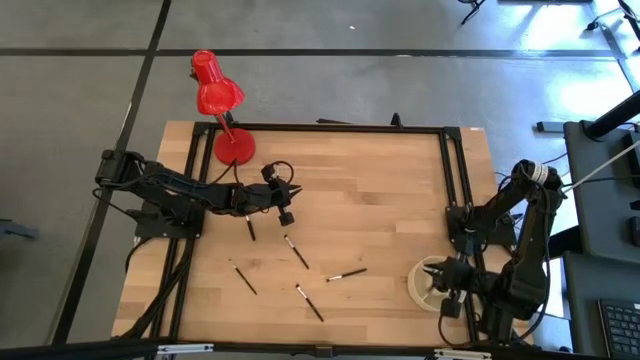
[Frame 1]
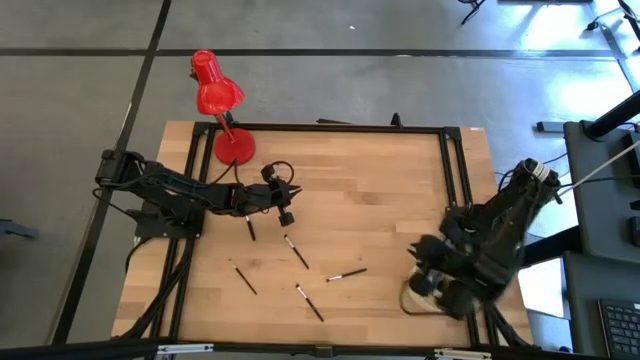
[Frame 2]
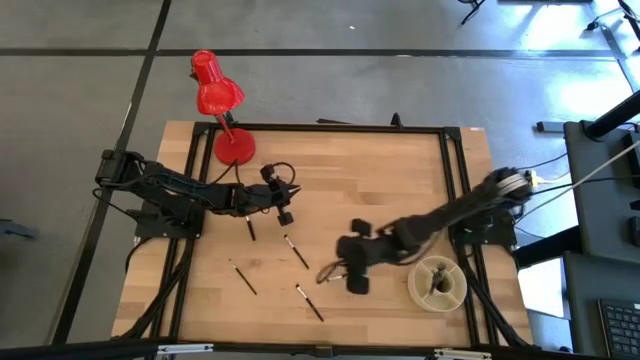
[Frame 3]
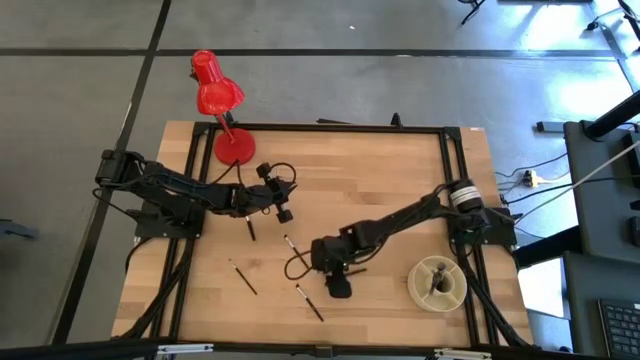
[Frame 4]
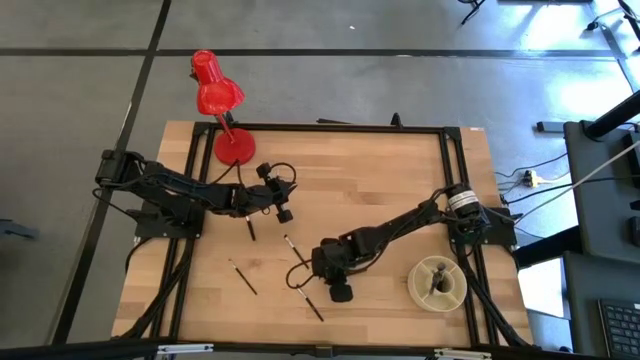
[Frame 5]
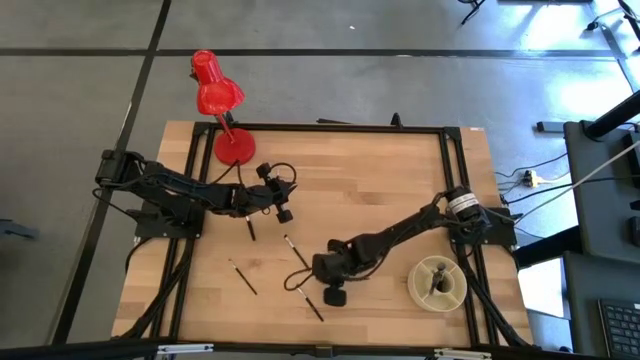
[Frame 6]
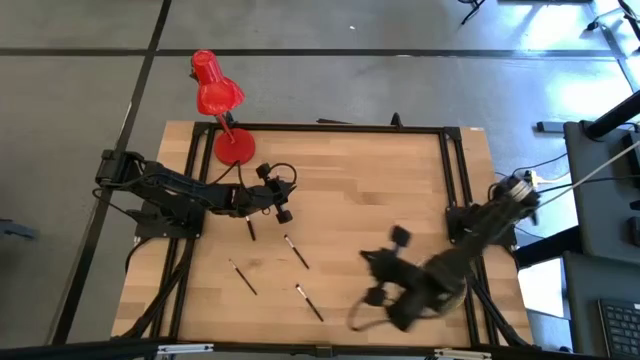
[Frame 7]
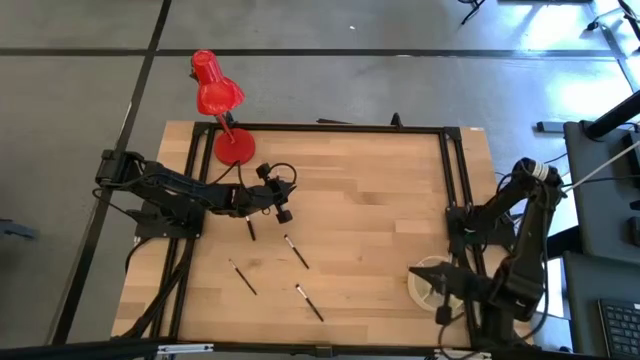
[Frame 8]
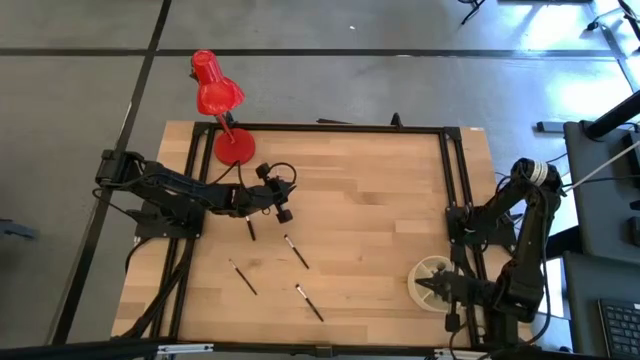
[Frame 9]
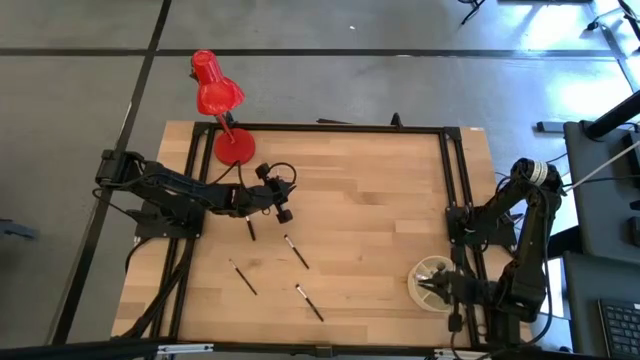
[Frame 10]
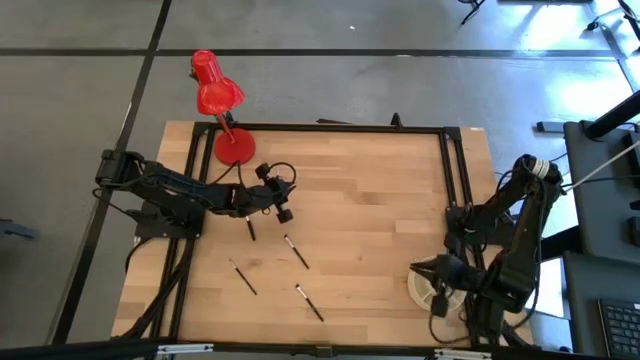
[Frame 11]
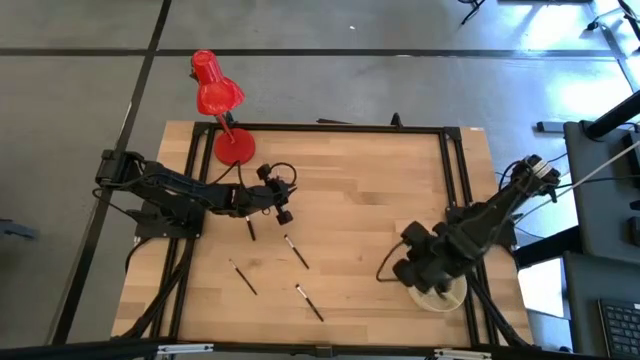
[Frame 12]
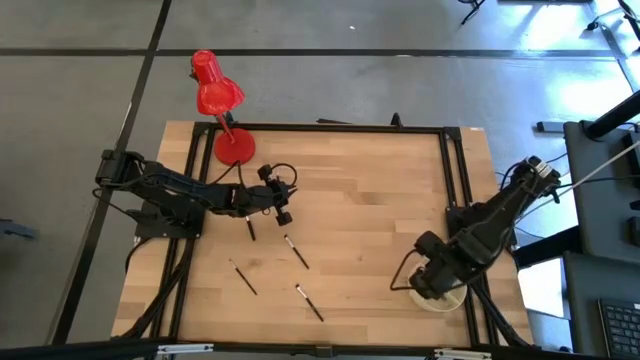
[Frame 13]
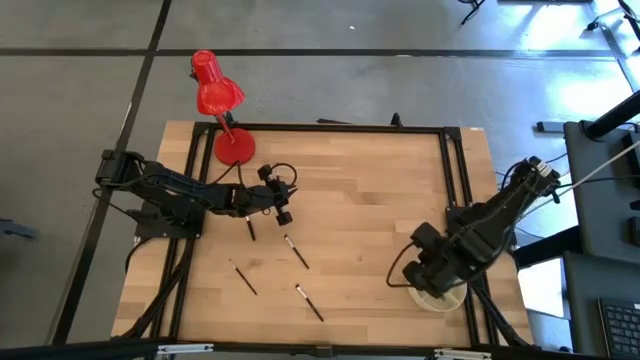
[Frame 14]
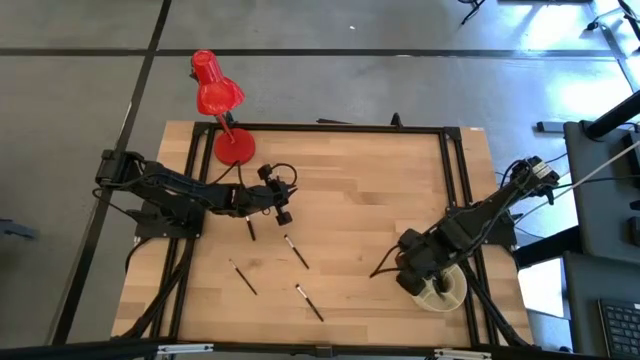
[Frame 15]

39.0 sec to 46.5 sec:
Task: Pick & Place Makeup Supplies
Put the makeup brush into the organizer

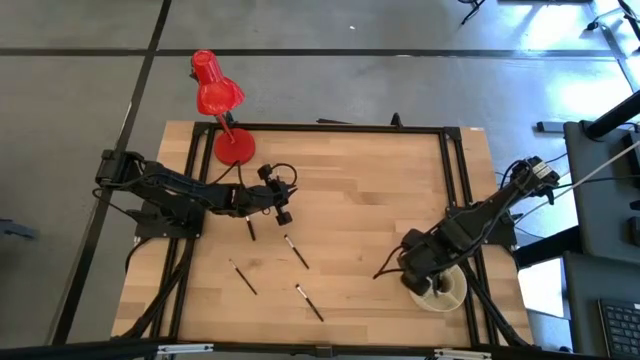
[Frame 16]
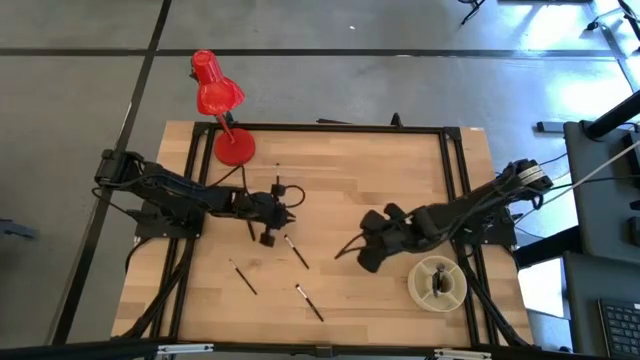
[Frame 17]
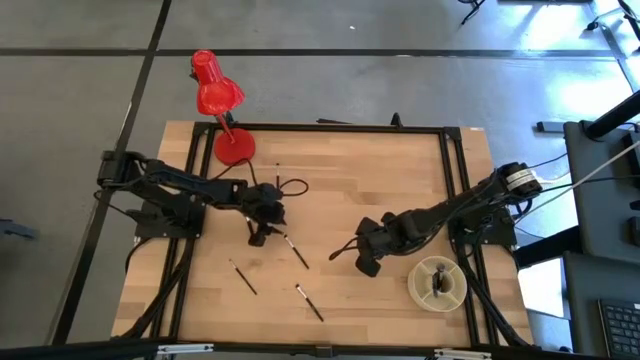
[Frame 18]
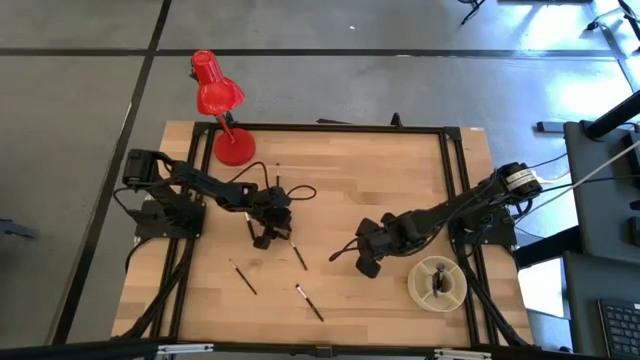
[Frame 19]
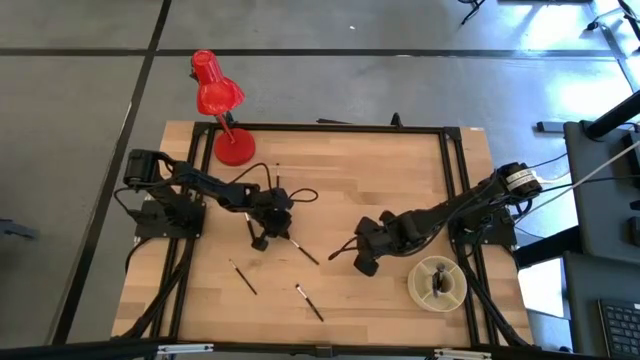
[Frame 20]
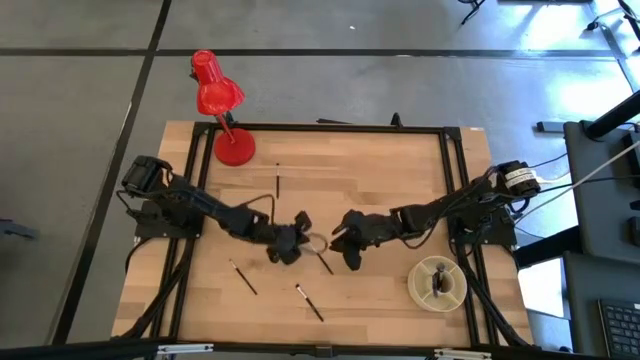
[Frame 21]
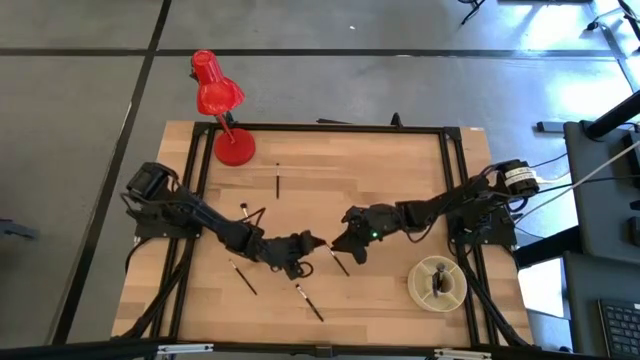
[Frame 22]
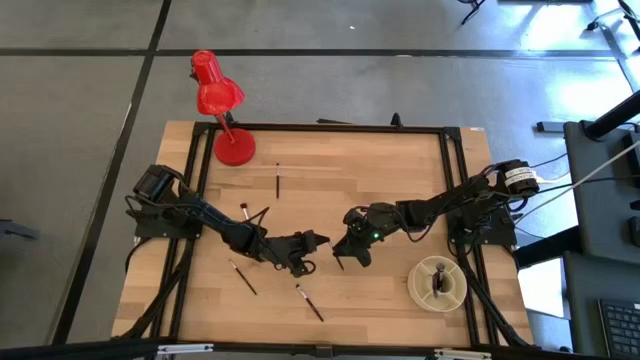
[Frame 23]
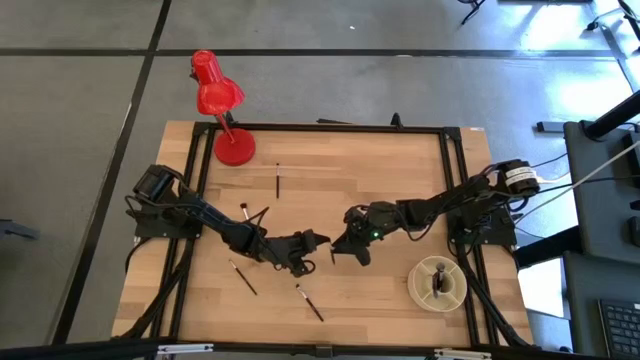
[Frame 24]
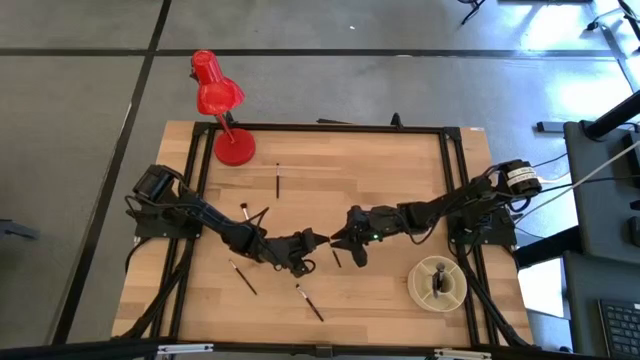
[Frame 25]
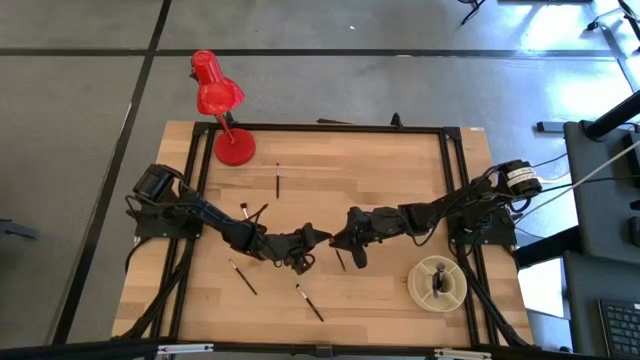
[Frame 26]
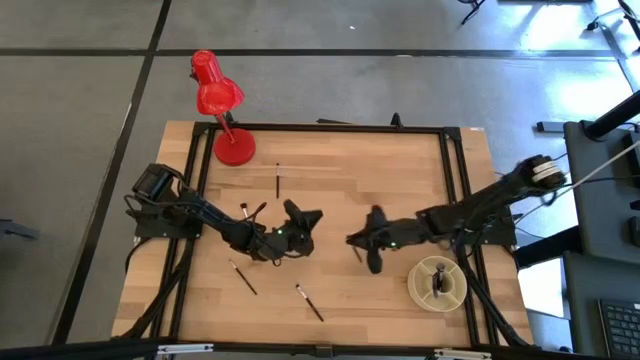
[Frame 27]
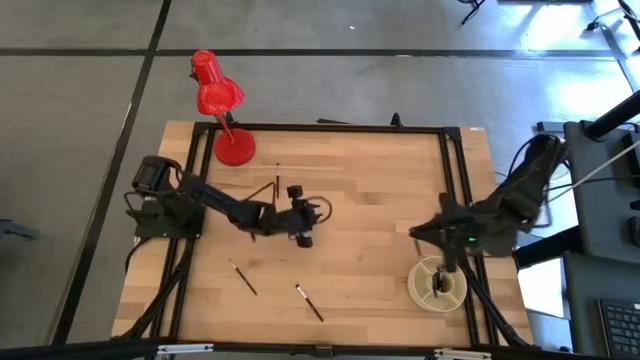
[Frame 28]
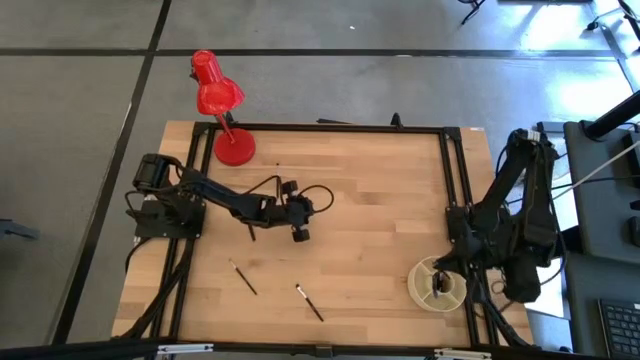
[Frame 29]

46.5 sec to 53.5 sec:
Put the makeup brush into the organizer

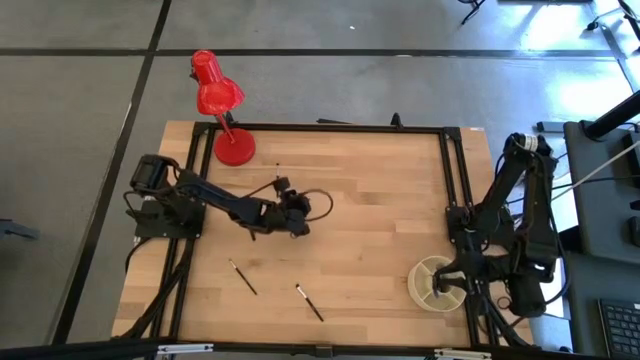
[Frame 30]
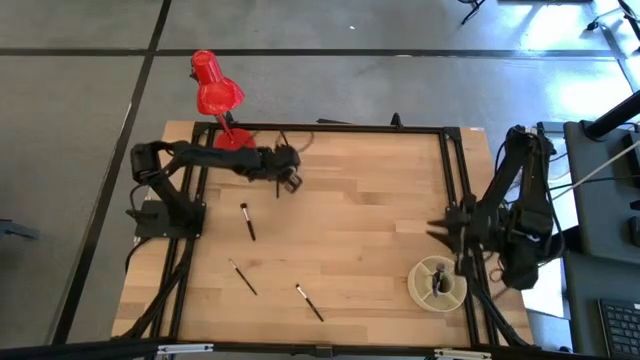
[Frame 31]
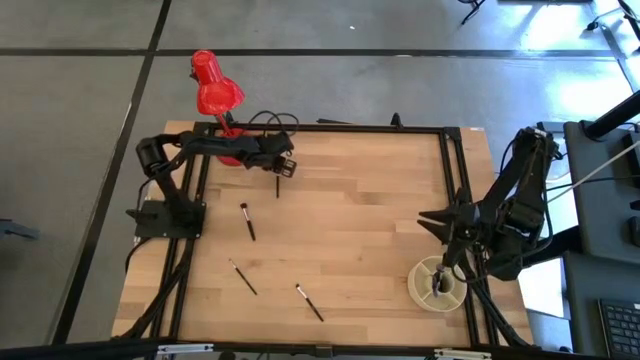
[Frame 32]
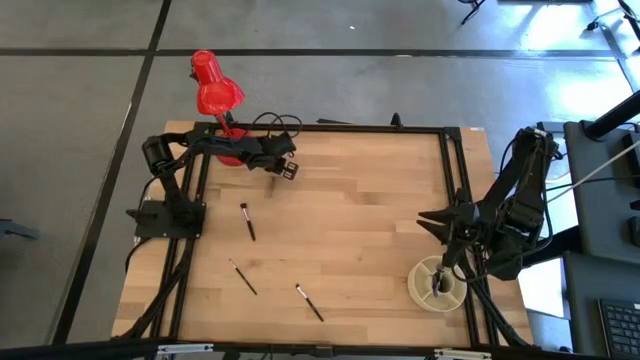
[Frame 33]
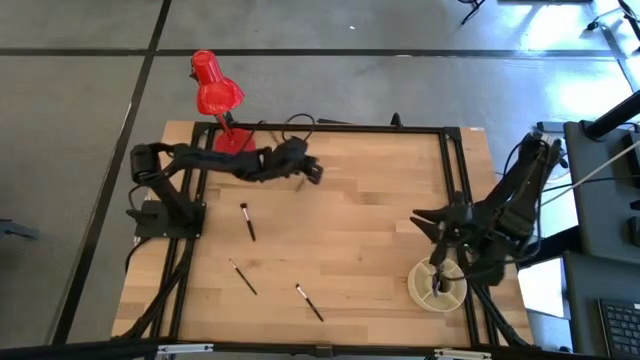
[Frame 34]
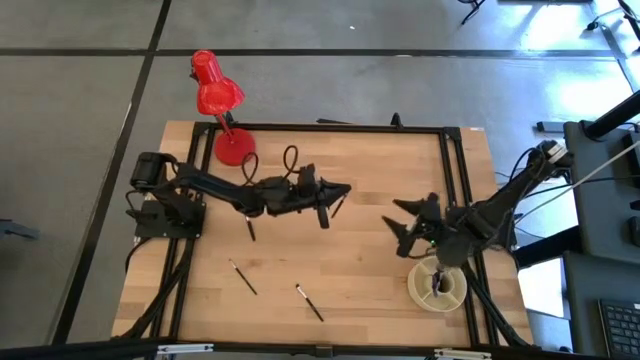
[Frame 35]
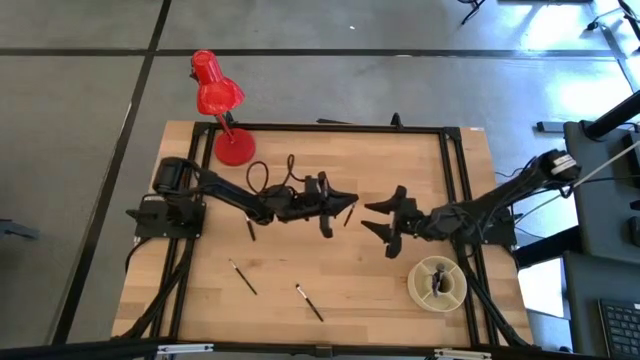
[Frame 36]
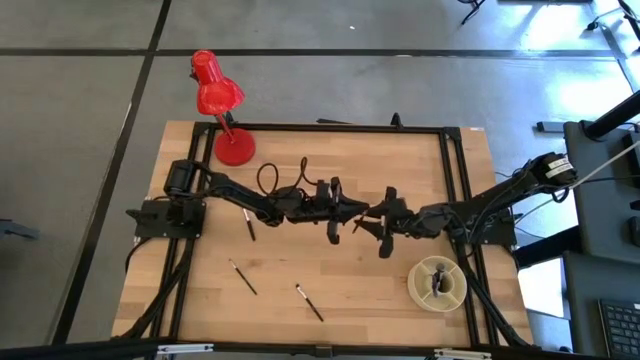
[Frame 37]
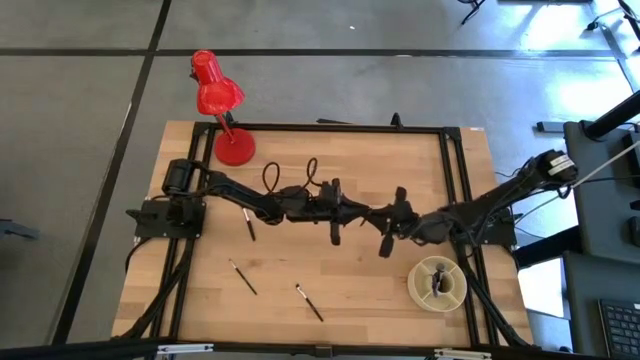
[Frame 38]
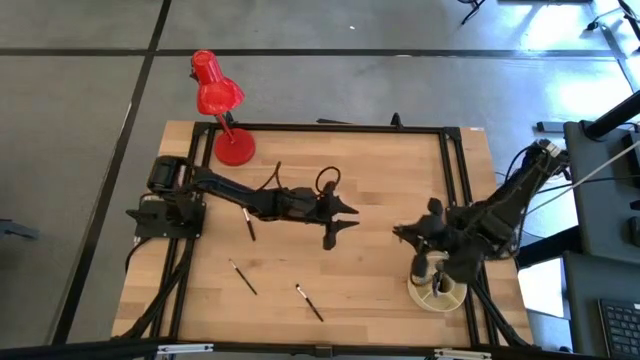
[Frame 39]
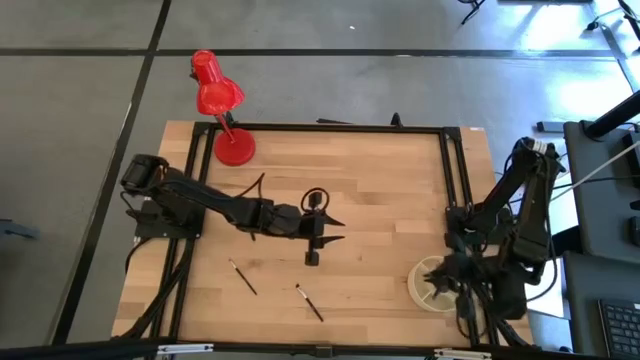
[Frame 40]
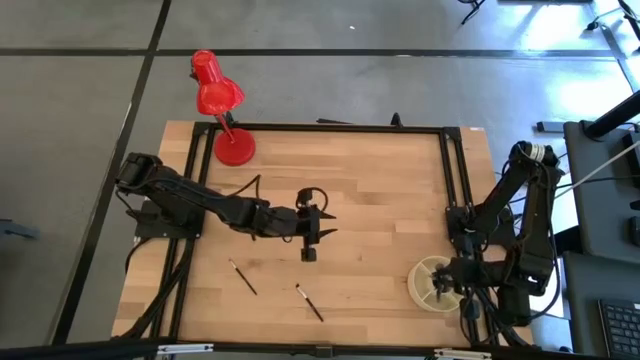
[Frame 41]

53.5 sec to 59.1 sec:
Put the makeup brush into the organizer

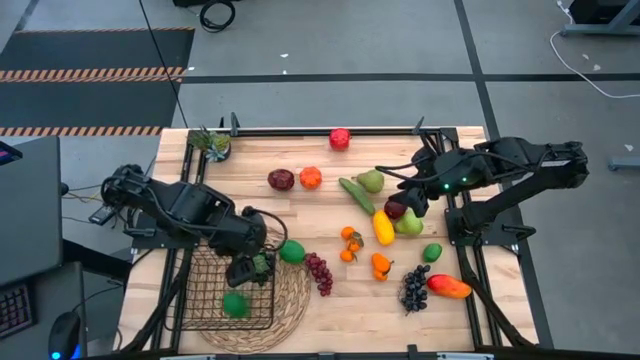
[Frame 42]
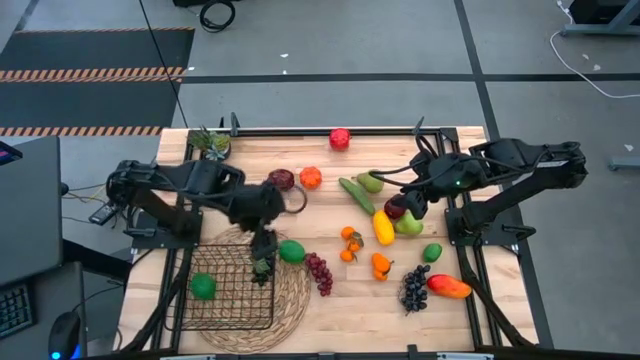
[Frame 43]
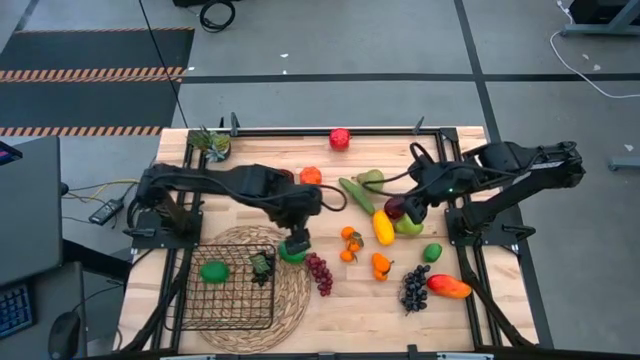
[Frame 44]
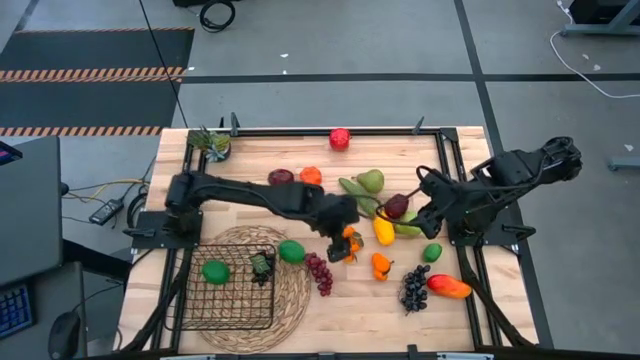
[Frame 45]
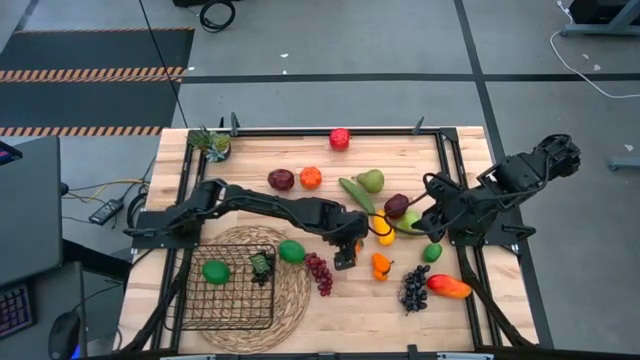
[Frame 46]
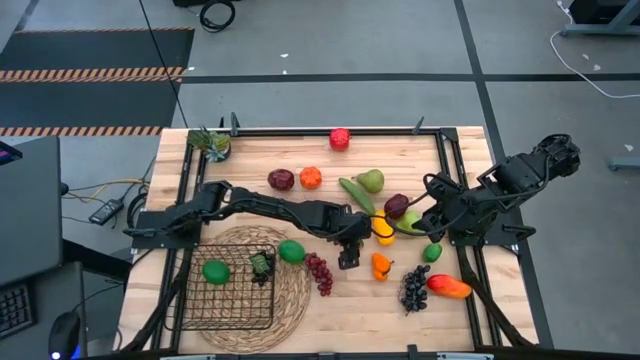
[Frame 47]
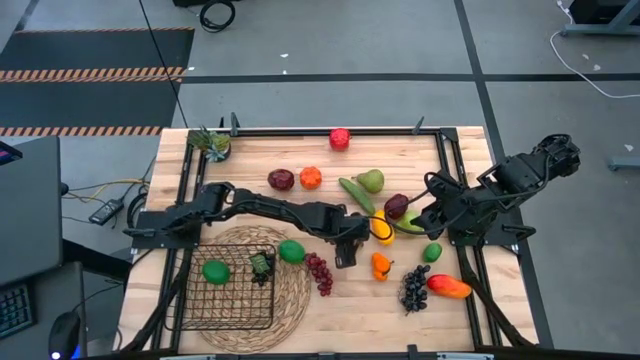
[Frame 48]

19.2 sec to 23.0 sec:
Task: Build produce basket
Put the top tangerine into the black wire basket
